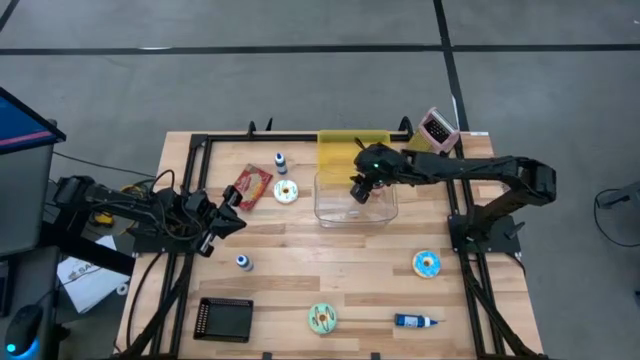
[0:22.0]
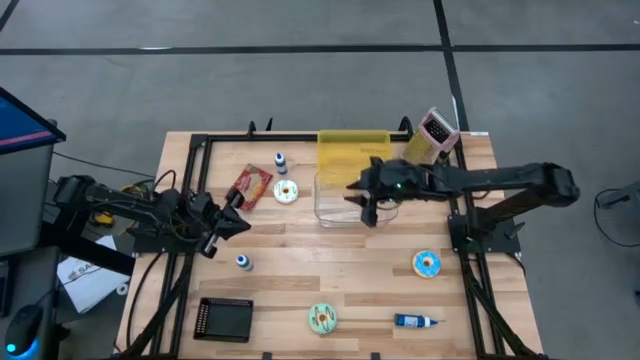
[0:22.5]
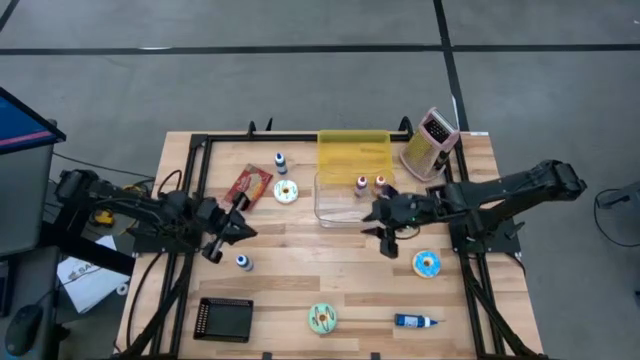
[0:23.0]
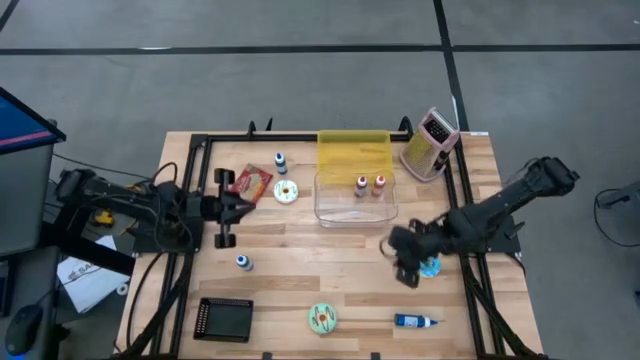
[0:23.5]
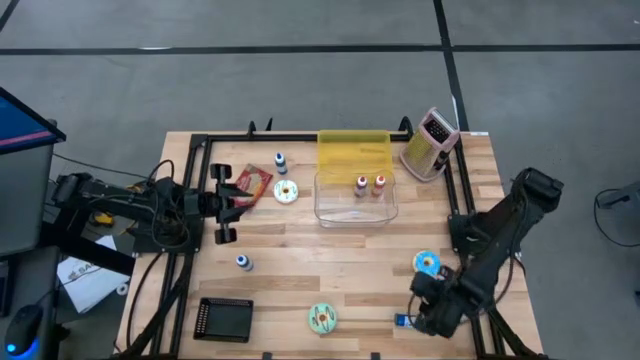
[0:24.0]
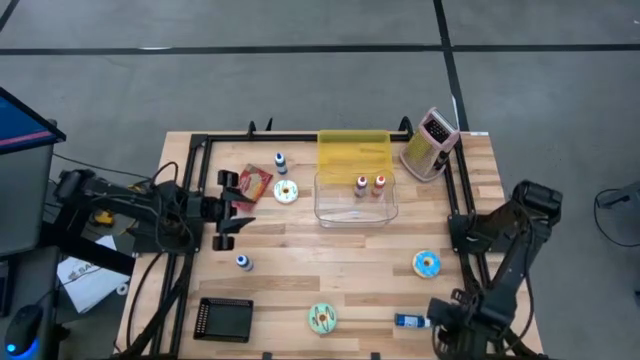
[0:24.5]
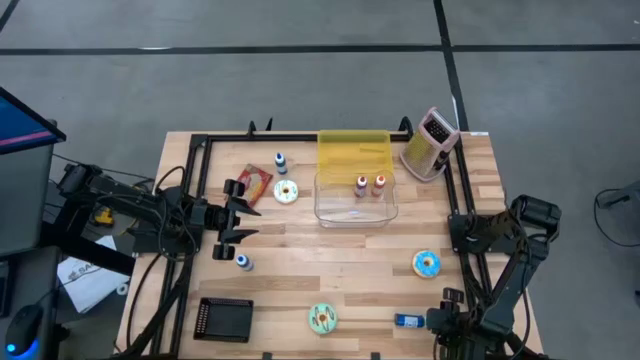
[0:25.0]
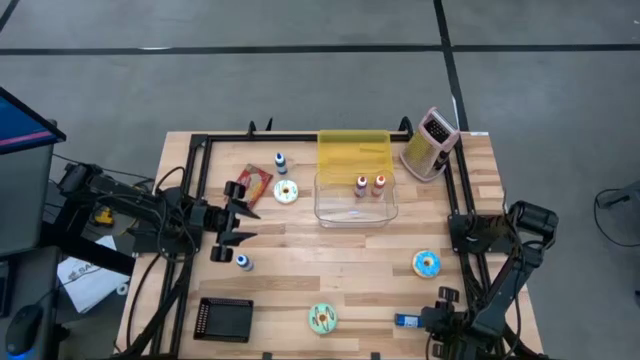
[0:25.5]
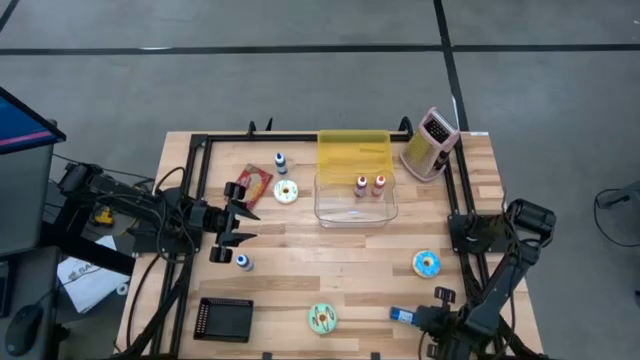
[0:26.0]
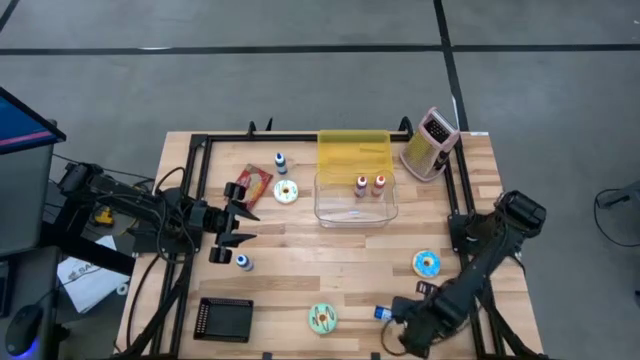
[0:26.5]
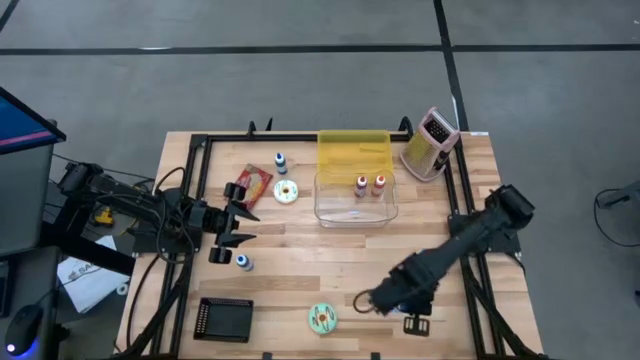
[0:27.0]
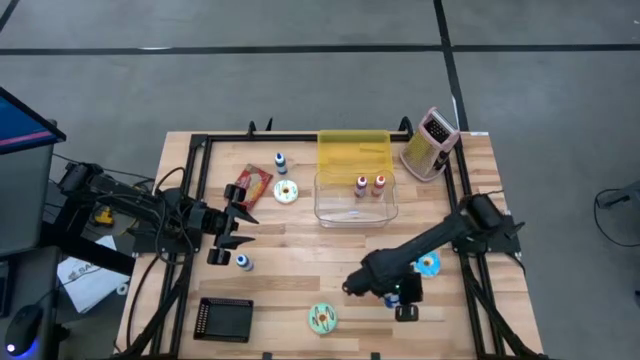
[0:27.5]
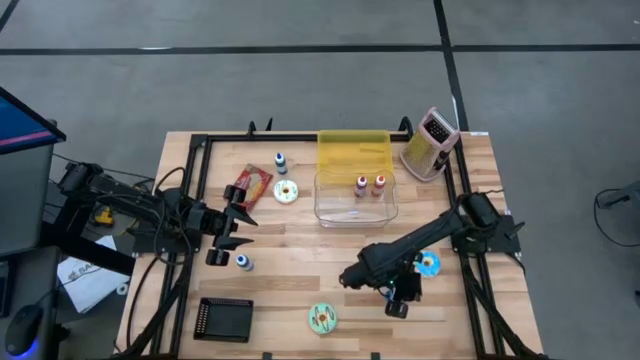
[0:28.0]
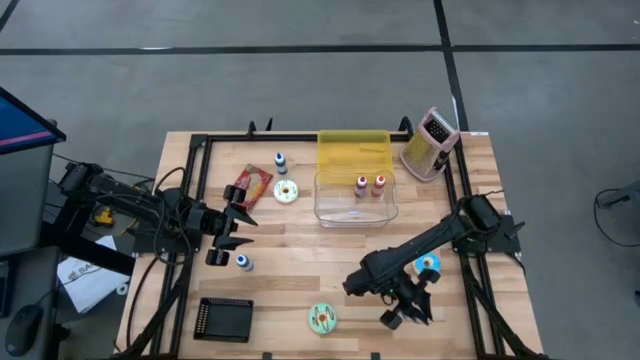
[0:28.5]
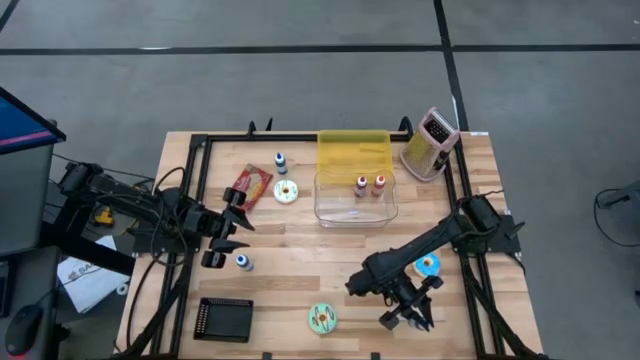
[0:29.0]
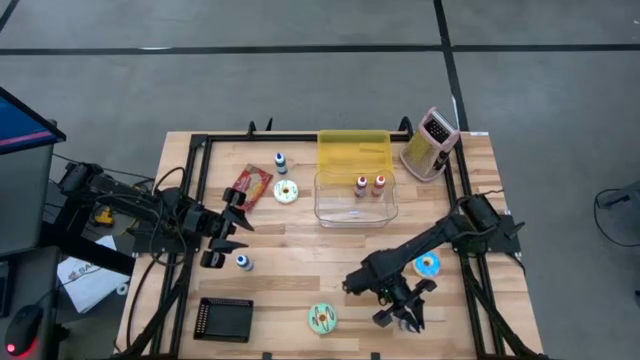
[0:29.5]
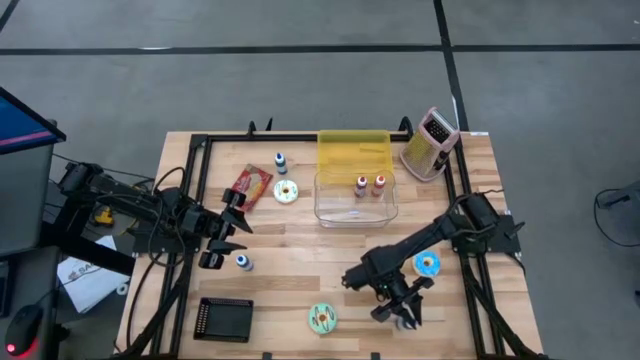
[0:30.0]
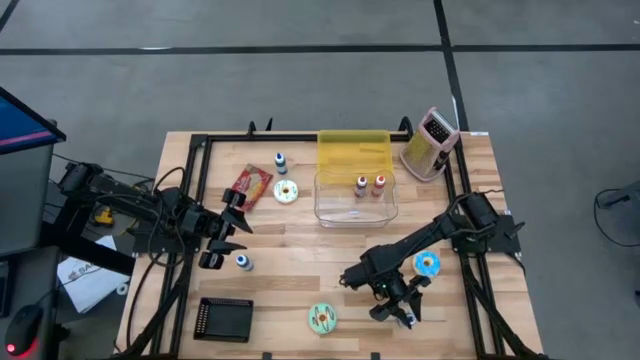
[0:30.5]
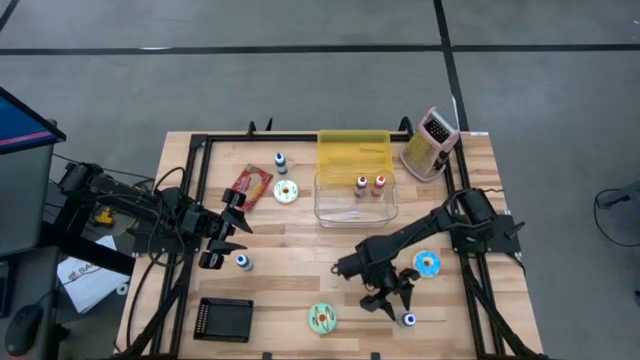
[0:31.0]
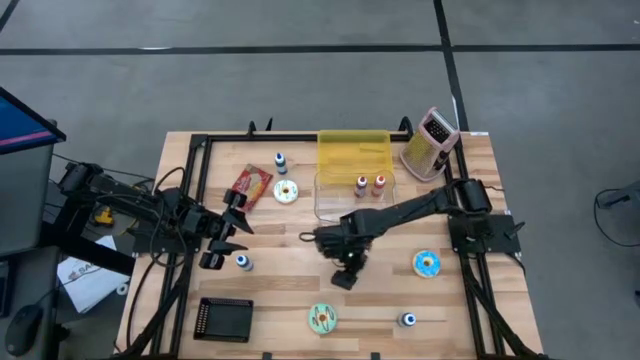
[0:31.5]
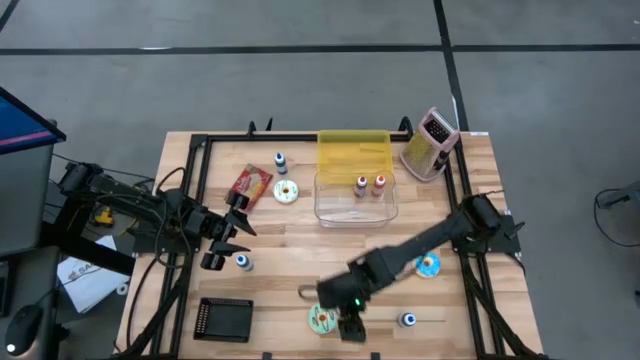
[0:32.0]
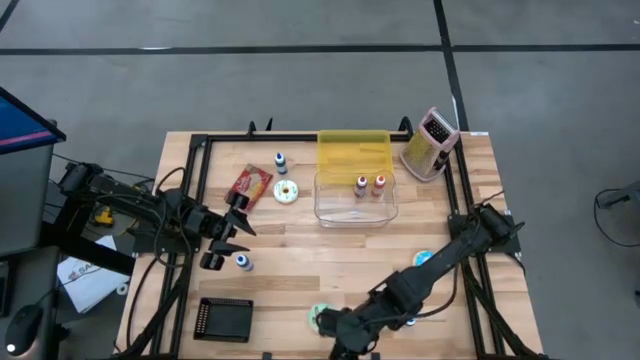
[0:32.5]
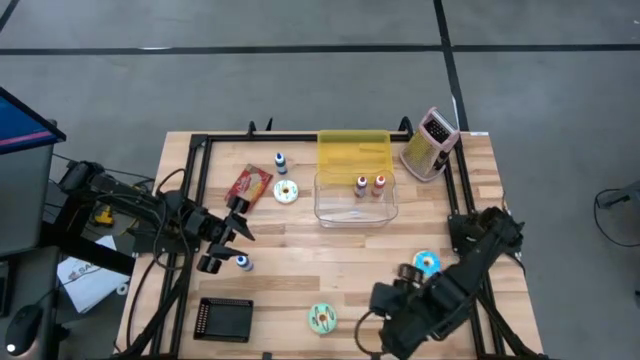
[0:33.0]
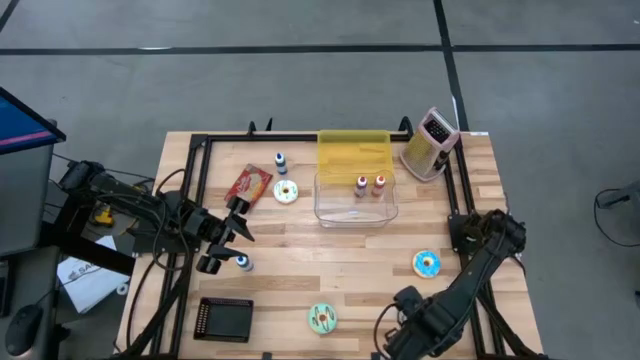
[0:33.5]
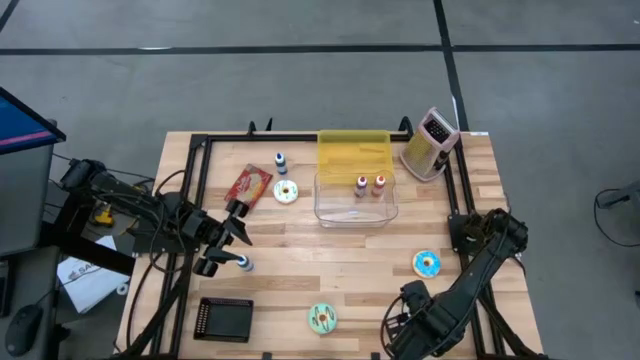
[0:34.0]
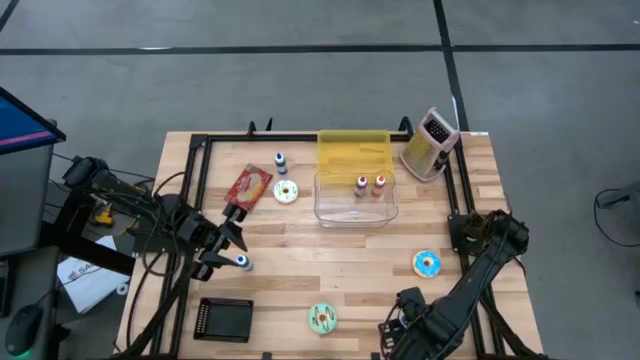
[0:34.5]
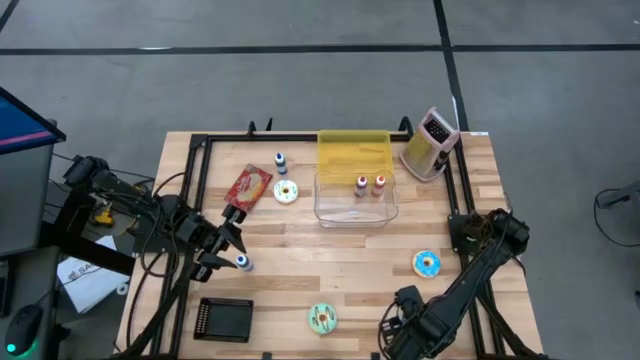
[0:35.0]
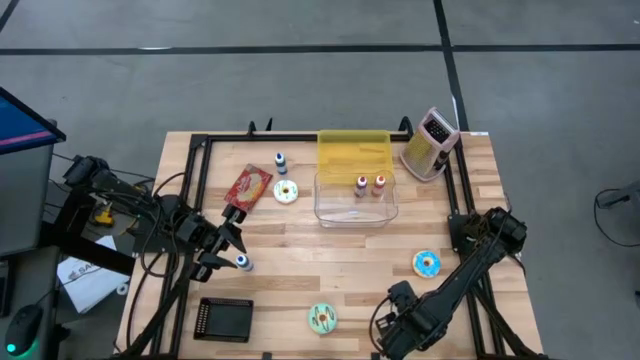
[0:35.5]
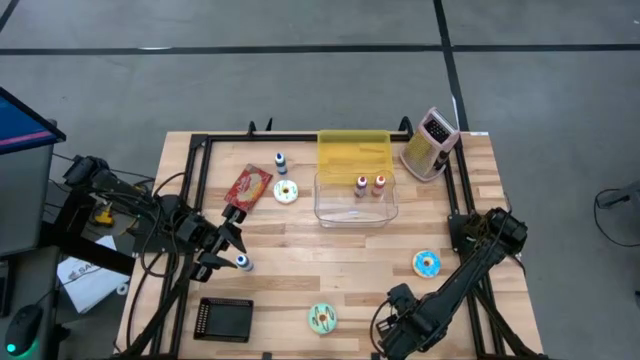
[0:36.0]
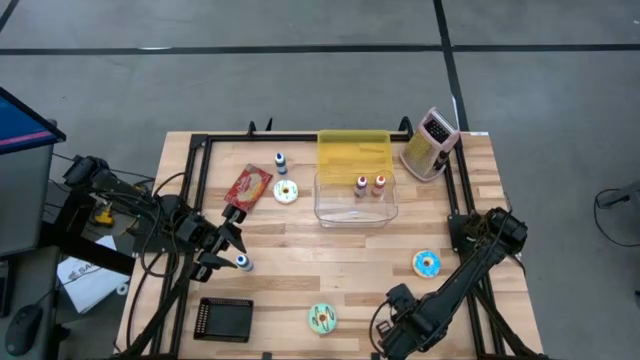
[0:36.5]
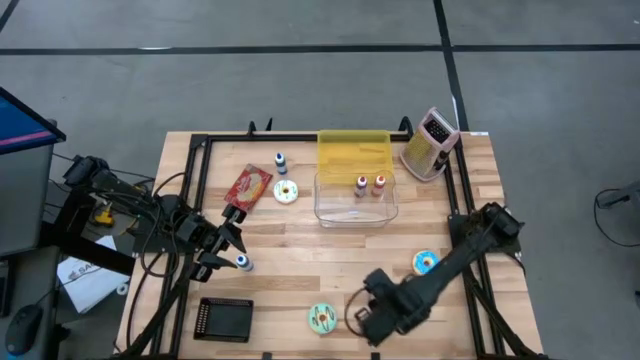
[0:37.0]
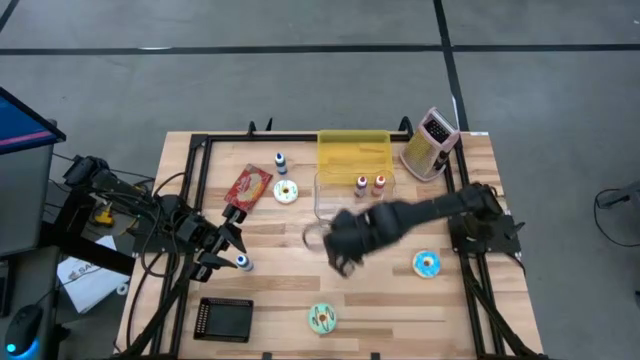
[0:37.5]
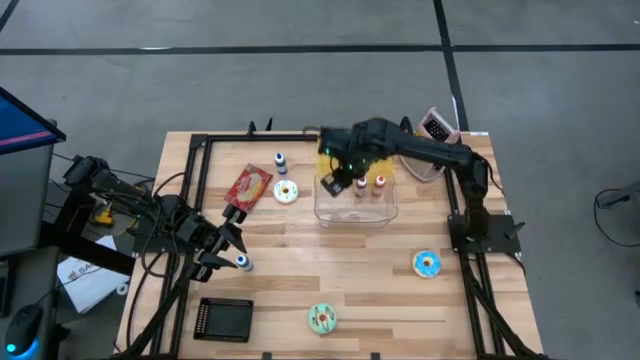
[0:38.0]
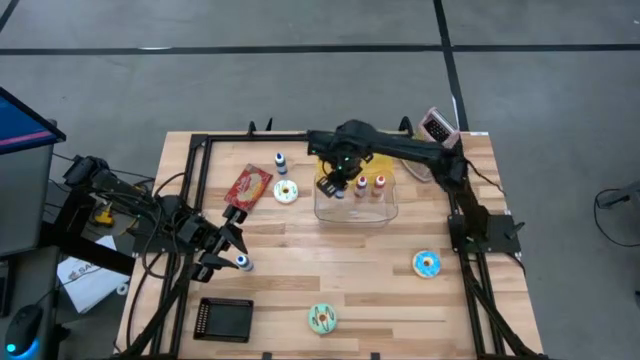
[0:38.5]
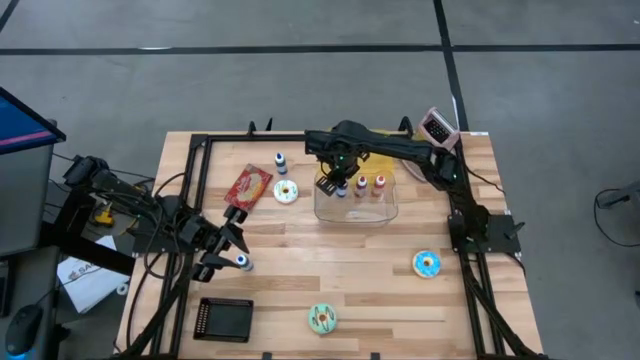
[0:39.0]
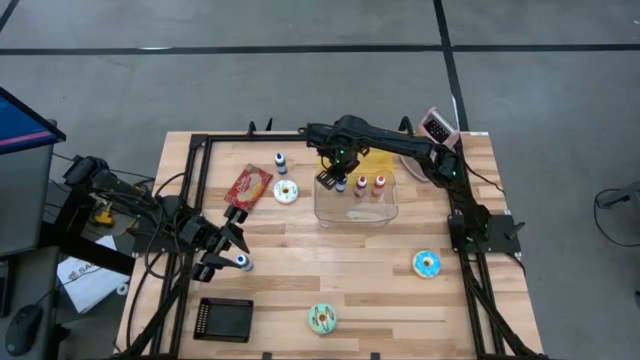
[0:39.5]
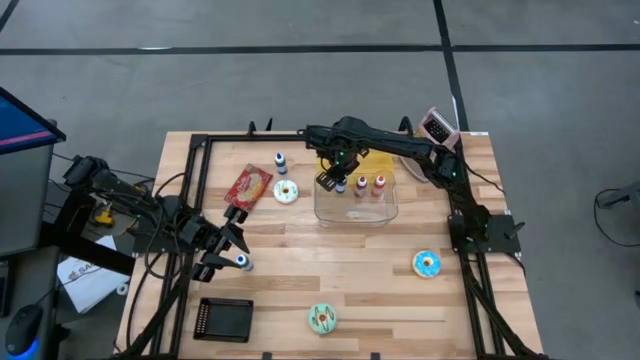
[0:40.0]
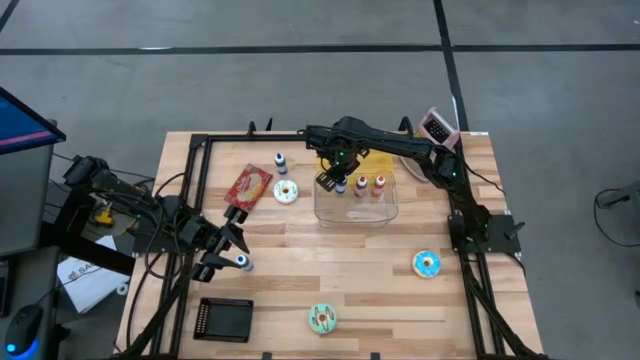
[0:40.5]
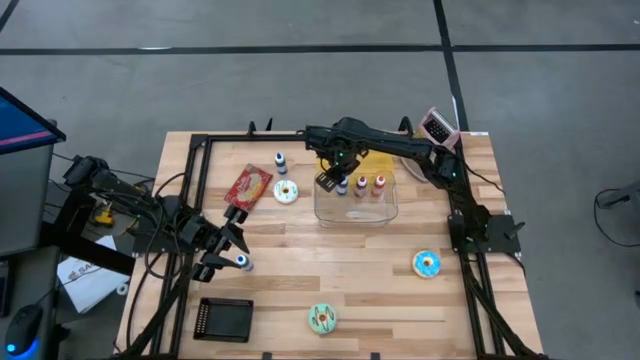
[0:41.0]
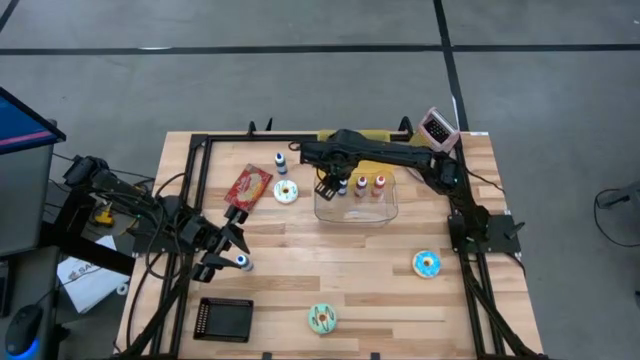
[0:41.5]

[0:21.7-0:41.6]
Put the bottom right blue food coloring bottle into the transparent bin

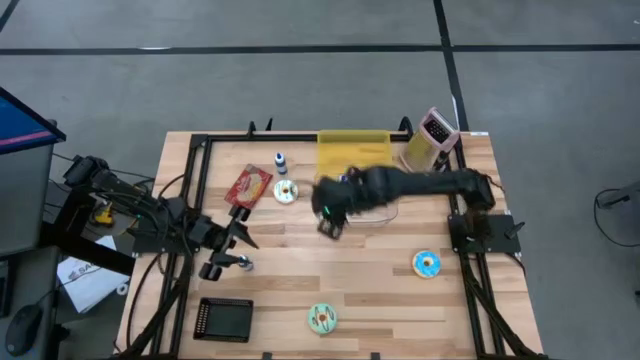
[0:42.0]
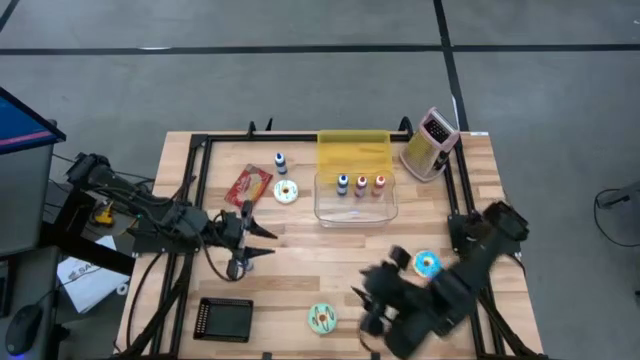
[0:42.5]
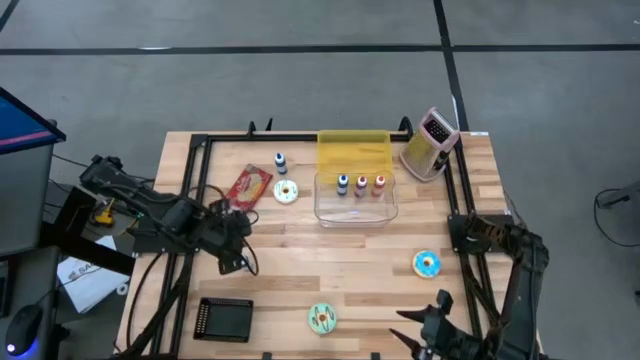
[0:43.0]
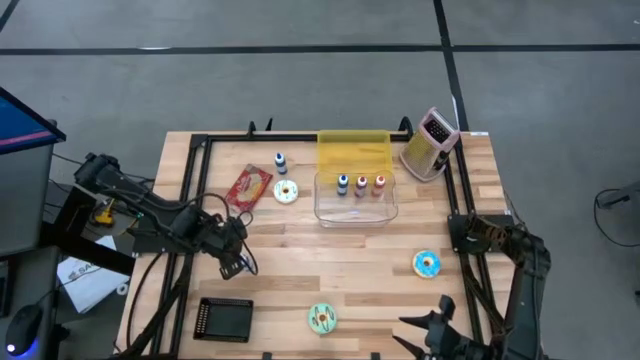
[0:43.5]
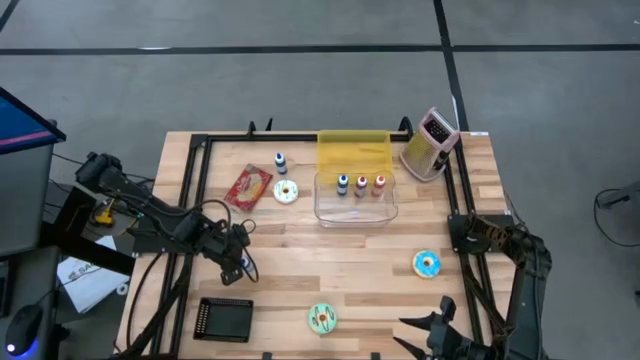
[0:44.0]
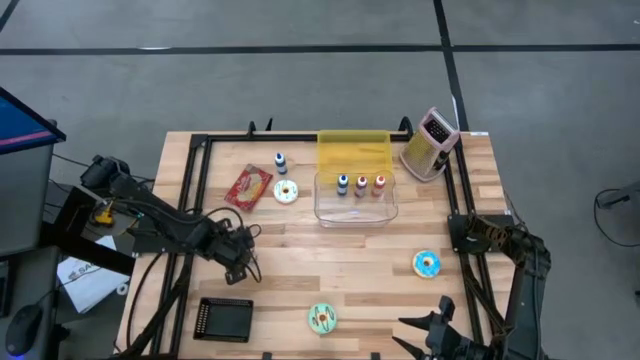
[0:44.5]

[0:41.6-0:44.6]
Put the bottom blue food coloring bottle into the transparent bin
